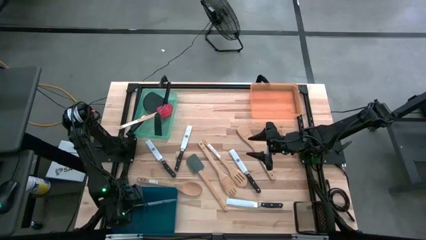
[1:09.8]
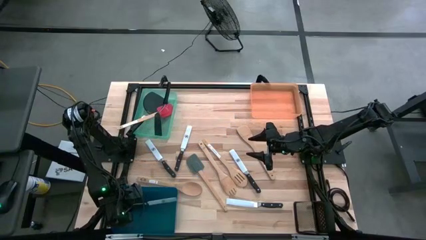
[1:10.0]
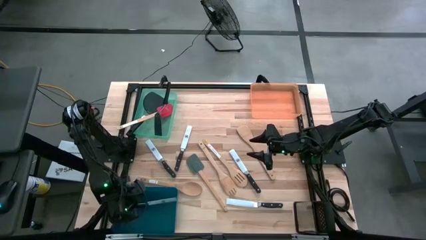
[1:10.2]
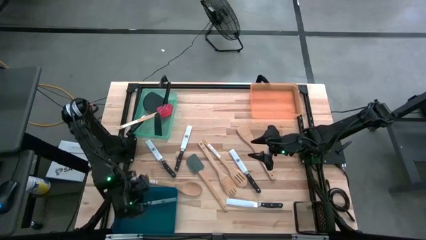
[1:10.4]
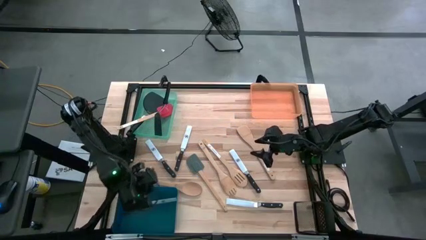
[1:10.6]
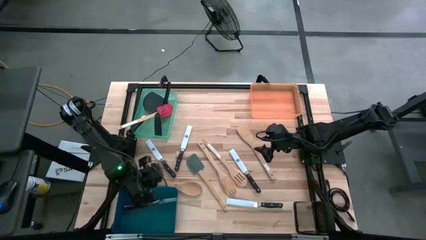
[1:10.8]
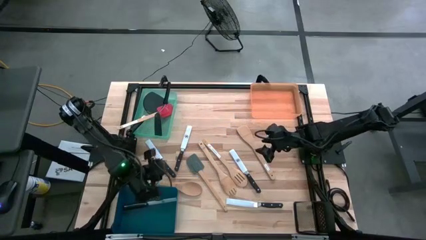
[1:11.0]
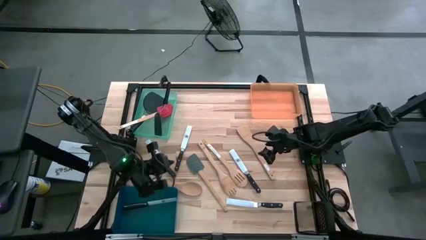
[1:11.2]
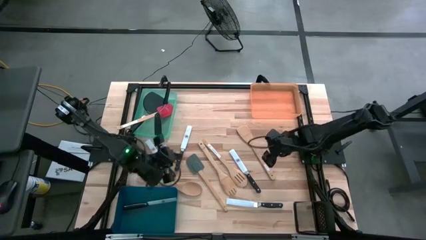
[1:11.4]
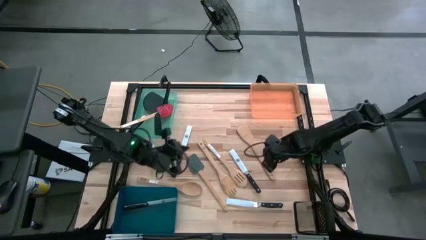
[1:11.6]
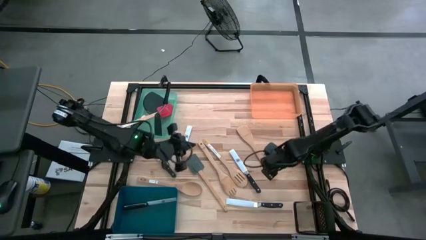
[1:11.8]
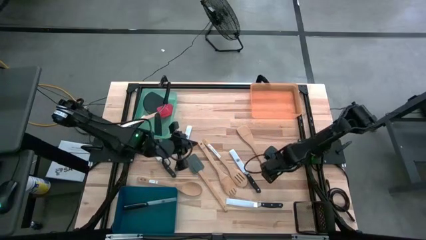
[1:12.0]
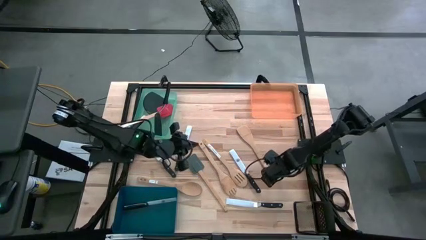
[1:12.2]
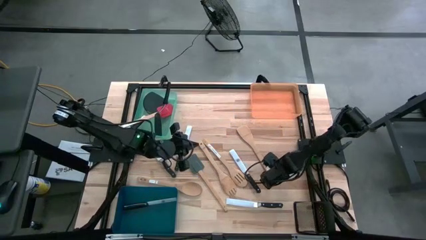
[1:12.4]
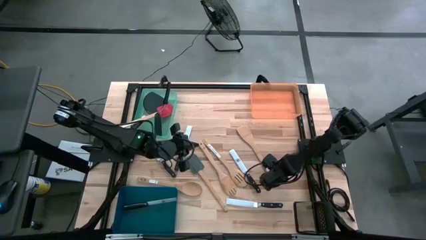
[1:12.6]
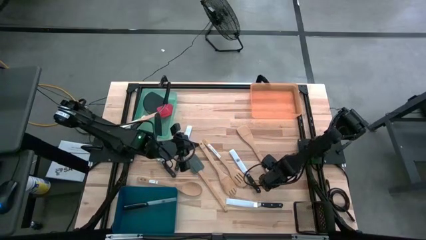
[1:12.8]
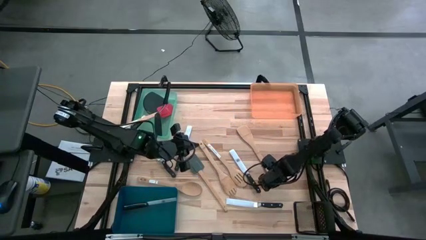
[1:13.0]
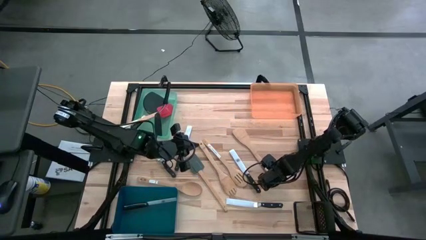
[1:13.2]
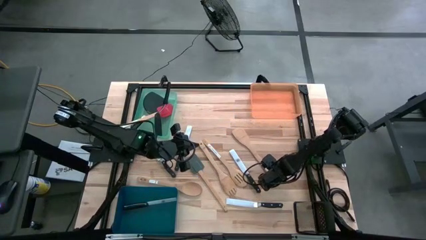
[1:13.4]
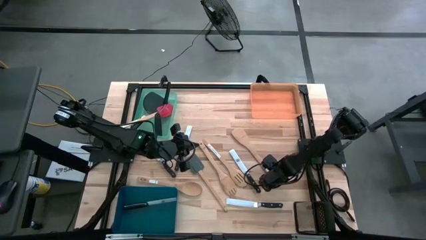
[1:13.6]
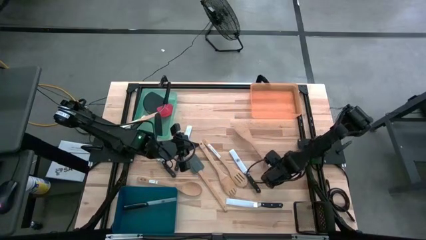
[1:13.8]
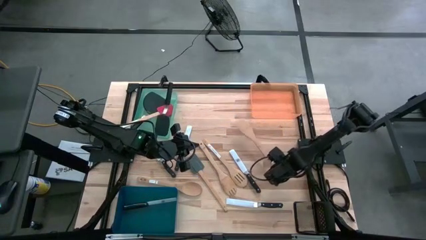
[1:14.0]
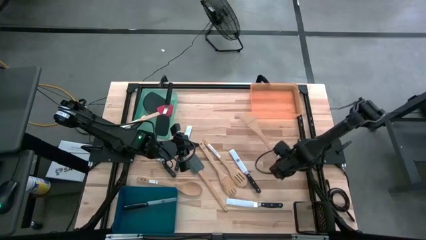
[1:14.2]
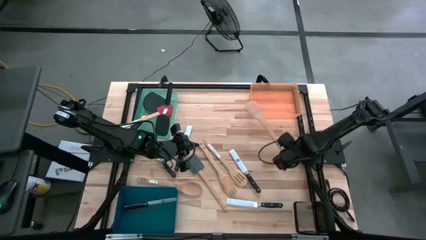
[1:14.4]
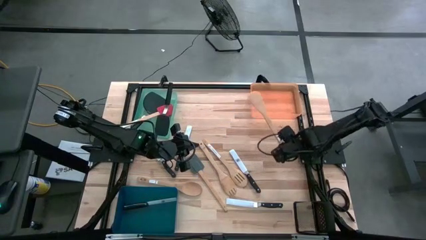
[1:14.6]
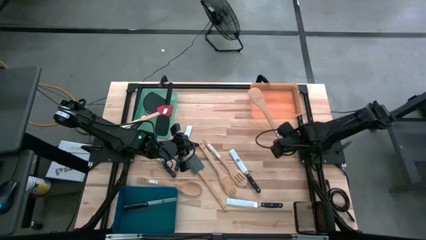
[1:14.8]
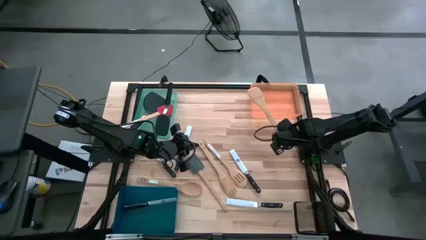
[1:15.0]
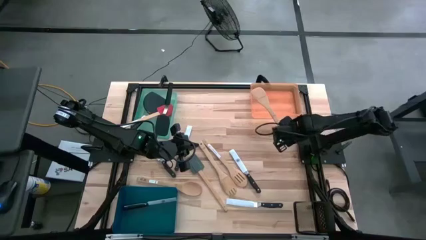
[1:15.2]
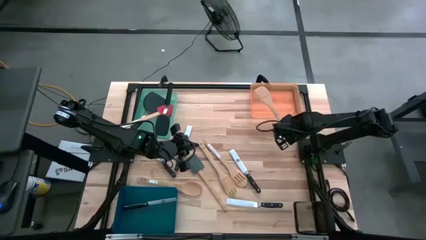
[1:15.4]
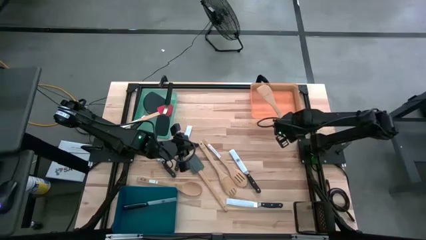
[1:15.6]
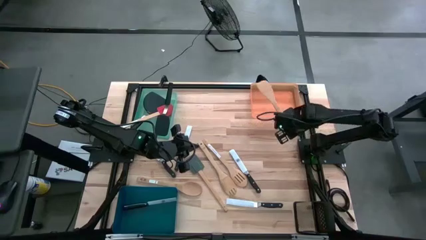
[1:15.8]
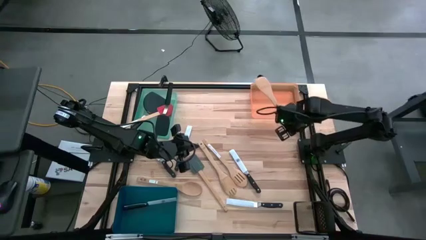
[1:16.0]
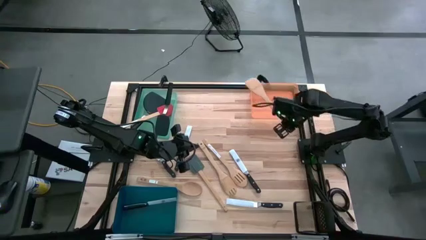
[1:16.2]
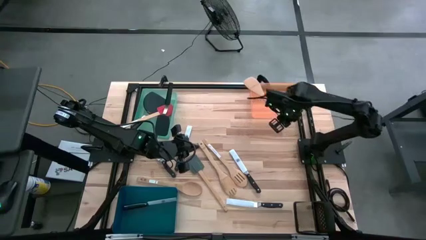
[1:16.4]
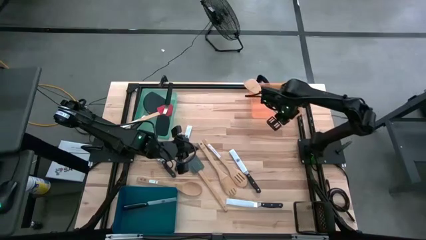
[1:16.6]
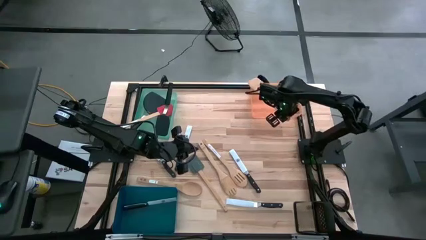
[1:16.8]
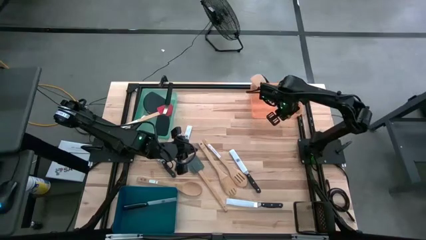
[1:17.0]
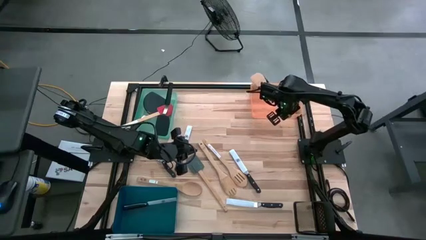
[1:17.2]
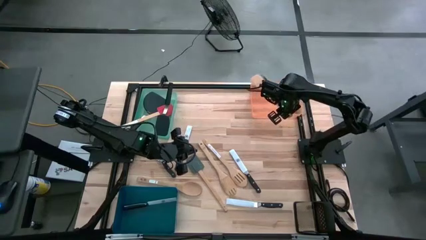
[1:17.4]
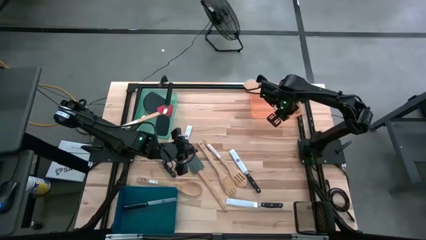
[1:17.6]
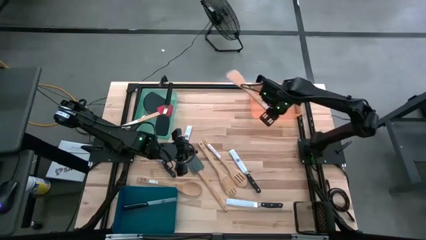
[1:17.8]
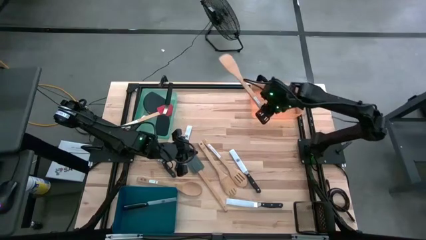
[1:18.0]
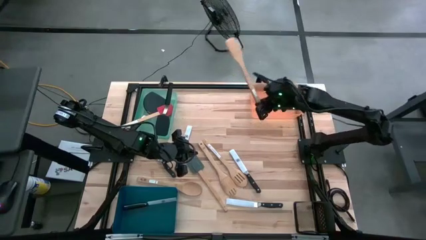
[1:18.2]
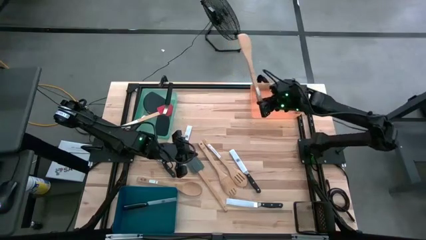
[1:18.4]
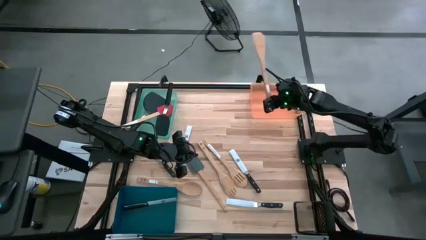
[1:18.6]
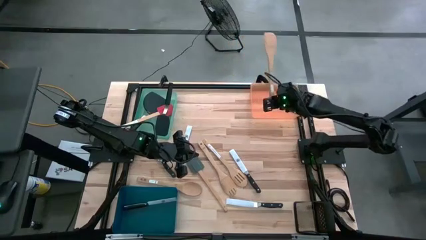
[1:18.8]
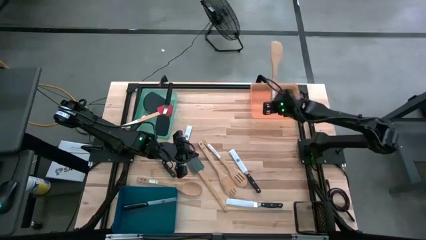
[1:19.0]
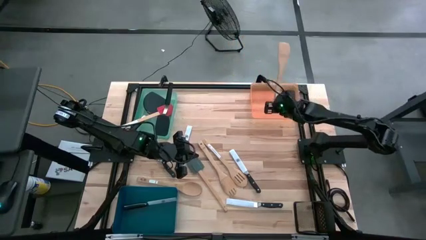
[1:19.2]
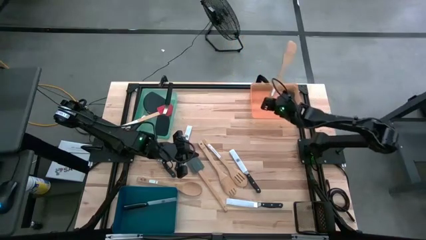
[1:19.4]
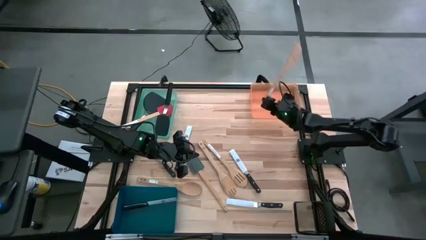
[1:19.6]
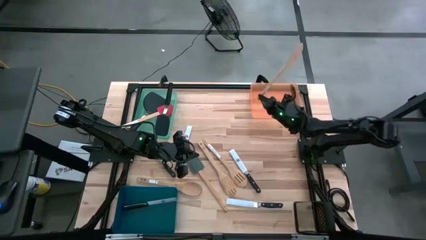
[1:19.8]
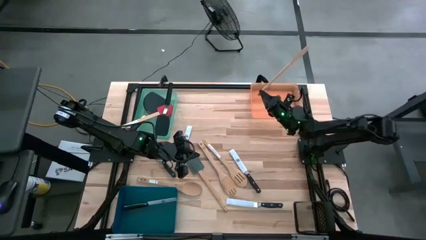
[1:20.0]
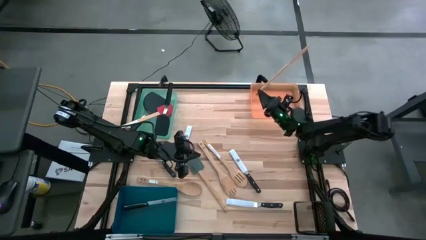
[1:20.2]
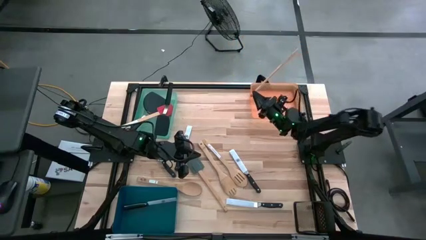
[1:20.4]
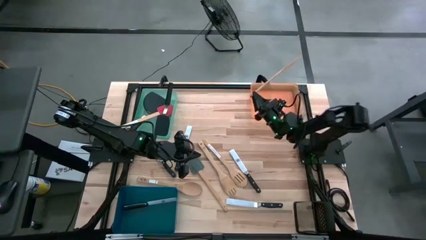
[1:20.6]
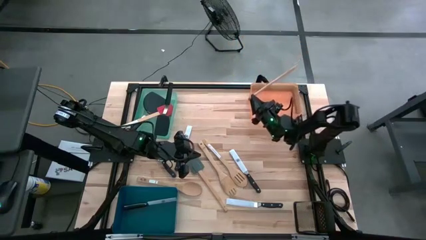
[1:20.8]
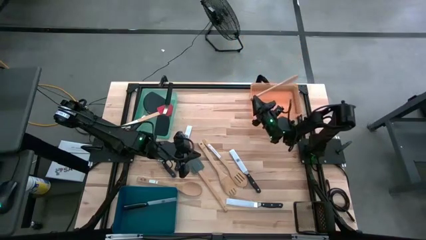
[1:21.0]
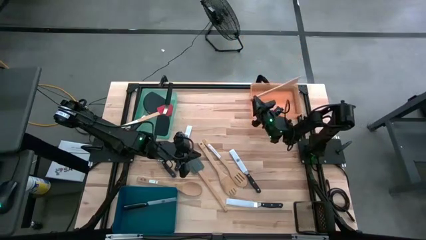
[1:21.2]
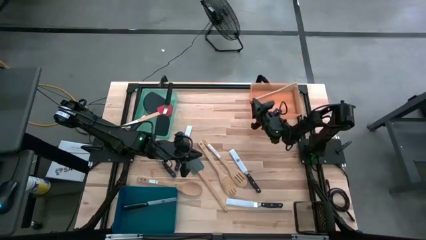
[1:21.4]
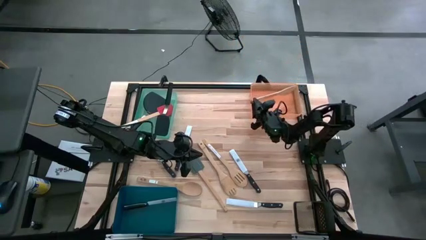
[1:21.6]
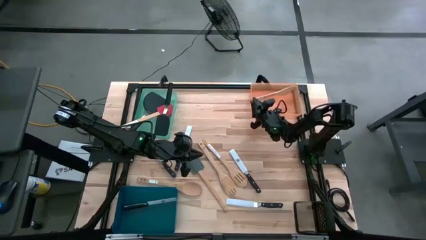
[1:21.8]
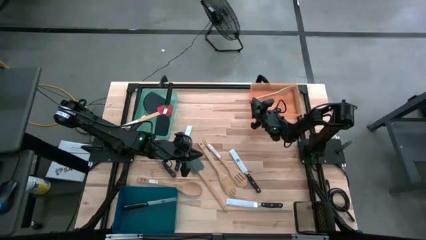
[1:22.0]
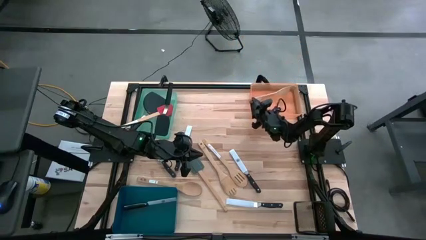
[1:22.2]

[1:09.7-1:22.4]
Task: Pick & Place Kitchen Items
Put the brown wooden turner into the orange bin

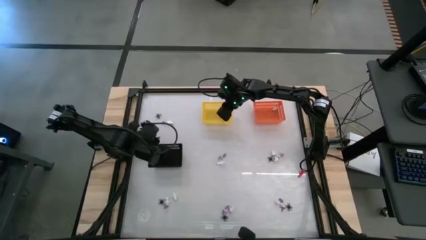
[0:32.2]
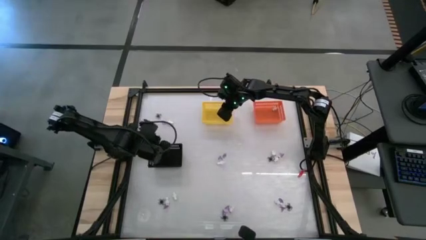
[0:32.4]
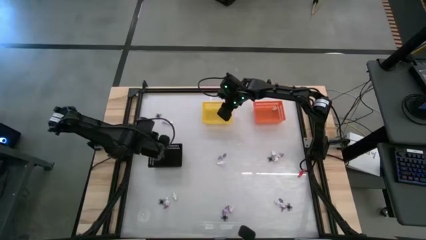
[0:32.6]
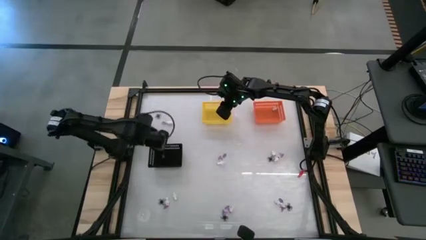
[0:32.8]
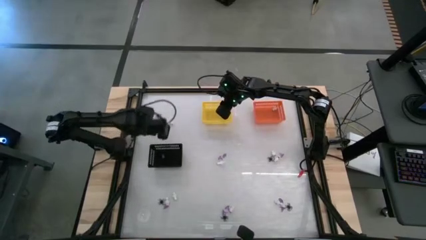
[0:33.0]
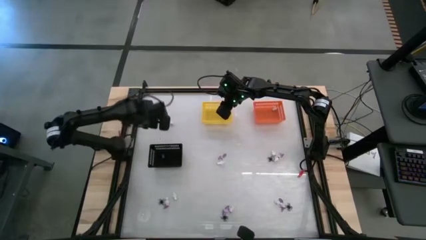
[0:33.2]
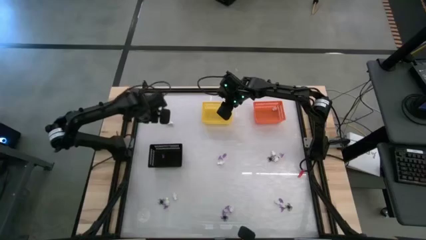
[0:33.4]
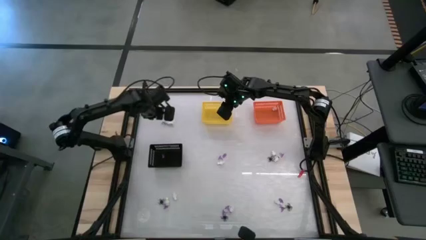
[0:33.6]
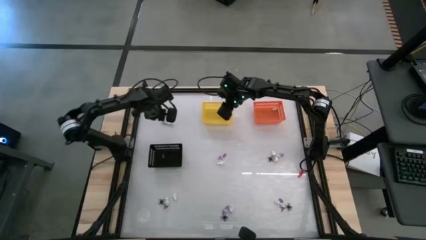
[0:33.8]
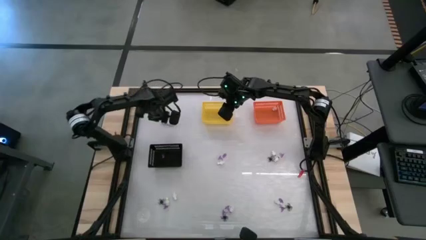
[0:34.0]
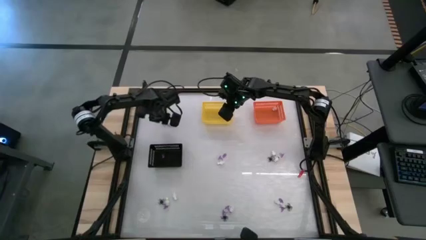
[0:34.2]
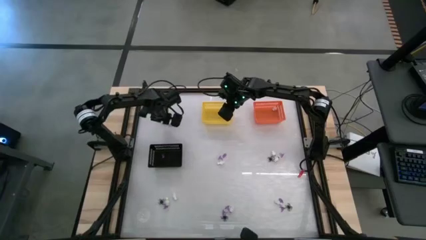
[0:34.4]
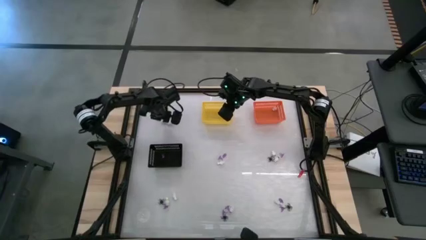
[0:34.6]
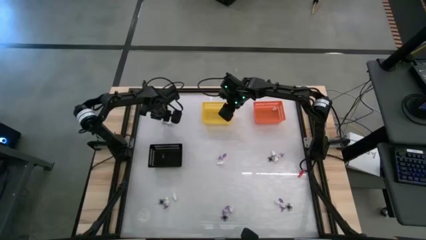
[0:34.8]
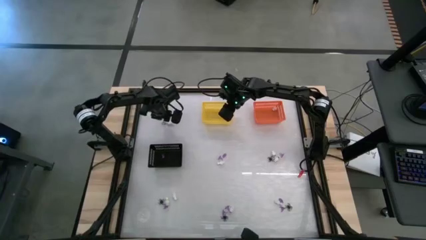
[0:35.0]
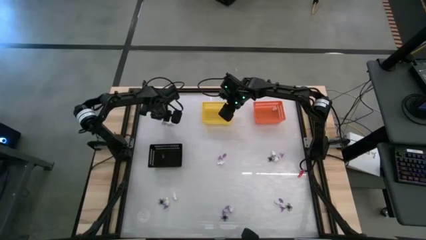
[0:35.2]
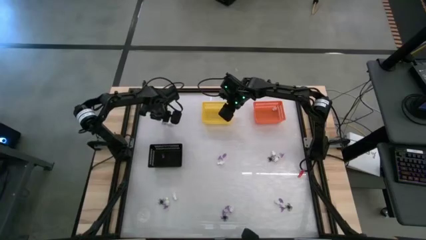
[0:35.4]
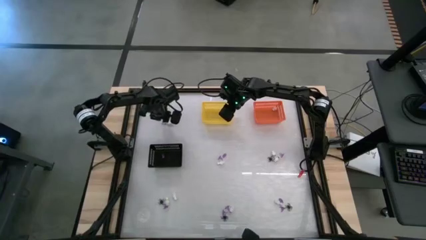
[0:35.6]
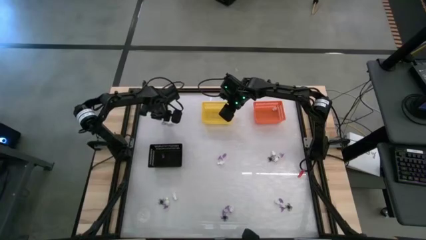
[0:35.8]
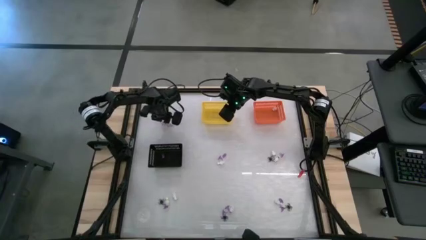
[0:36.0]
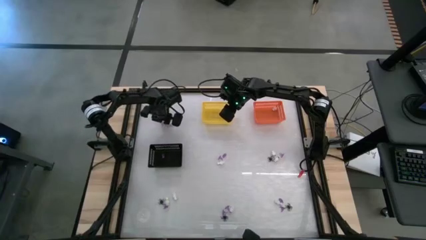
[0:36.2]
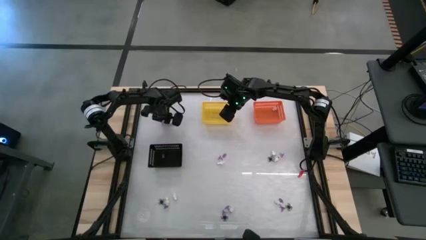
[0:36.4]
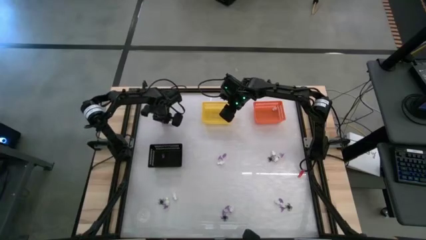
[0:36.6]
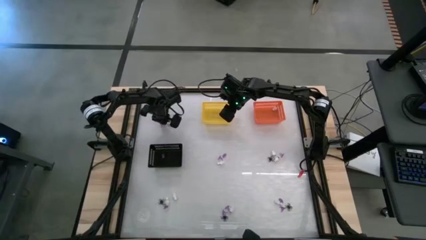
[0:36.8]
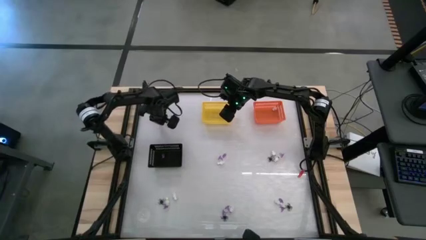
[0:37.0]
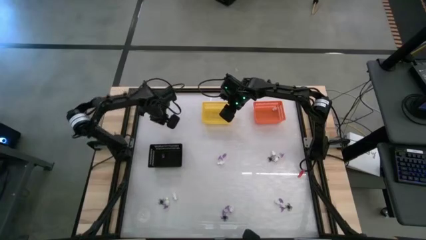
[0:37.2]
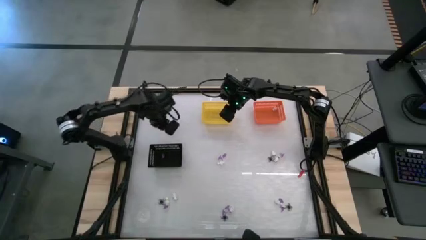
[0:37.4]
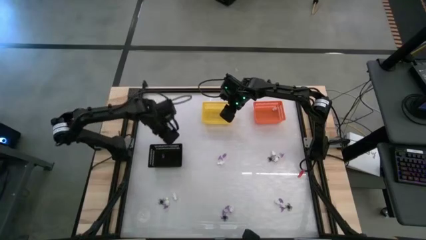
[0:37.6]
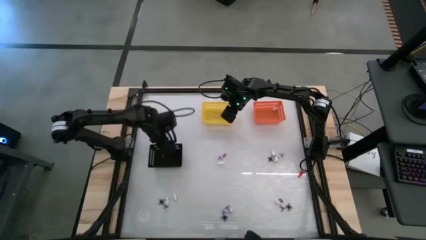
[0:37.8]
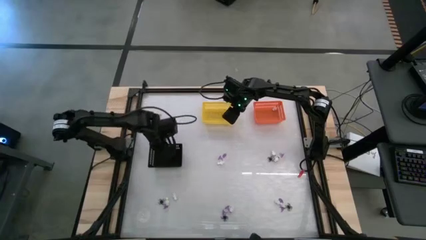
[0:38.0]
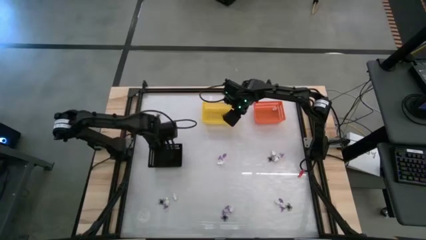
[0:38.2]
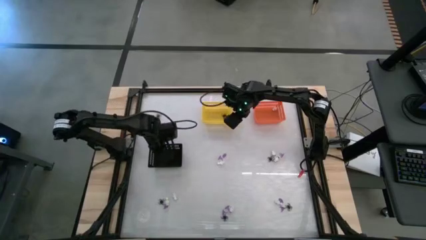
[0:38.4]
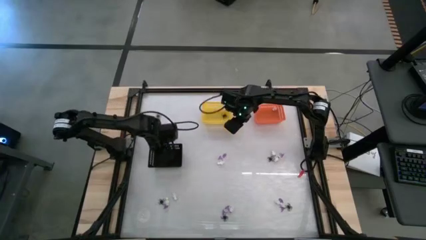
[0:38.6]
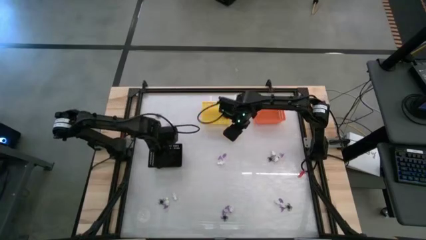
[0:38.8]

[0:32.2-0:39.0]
Task: Sort Halloween decoration
Put the purple hat toy into the black basket
